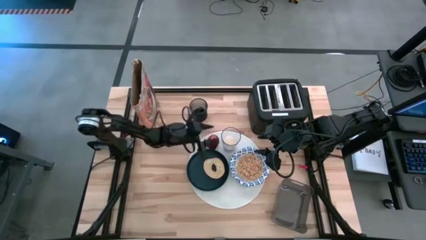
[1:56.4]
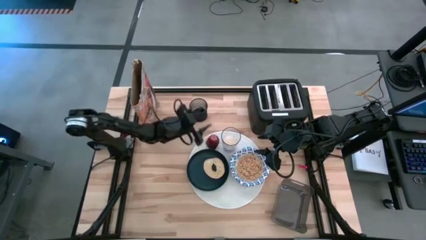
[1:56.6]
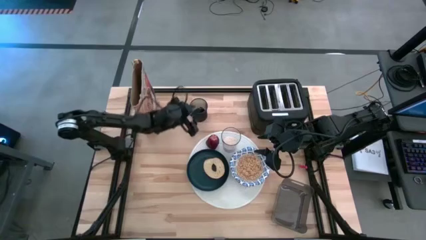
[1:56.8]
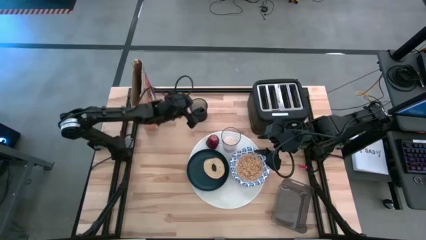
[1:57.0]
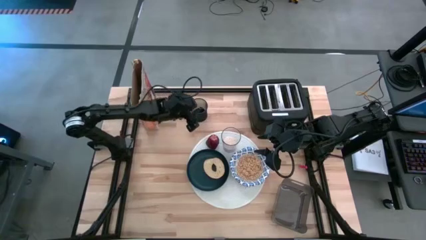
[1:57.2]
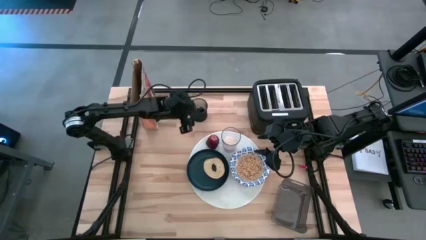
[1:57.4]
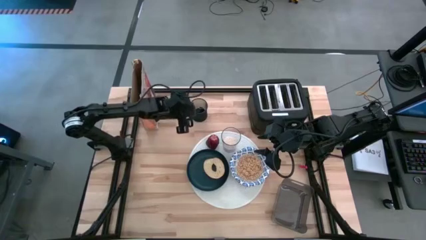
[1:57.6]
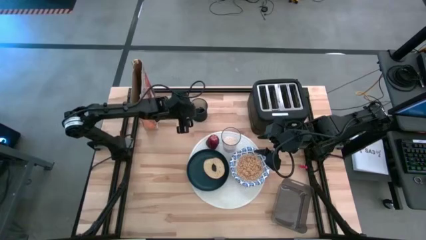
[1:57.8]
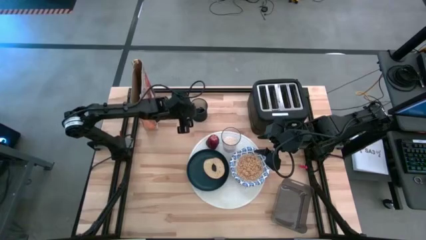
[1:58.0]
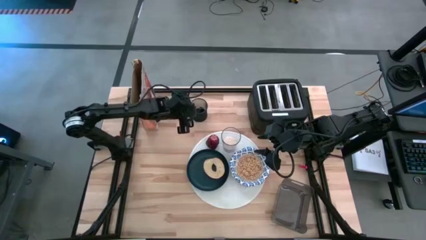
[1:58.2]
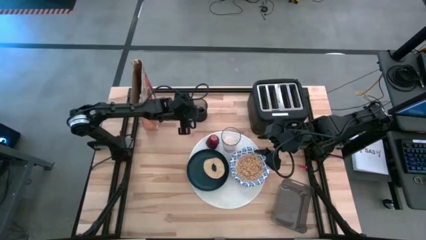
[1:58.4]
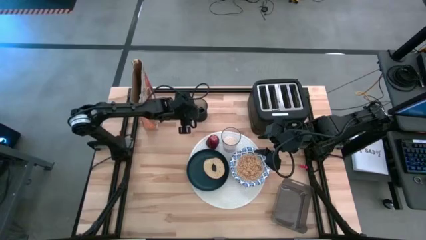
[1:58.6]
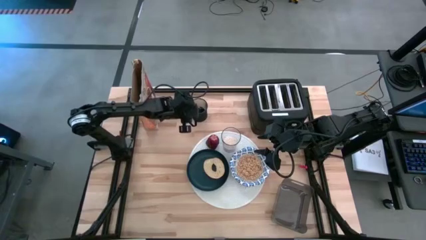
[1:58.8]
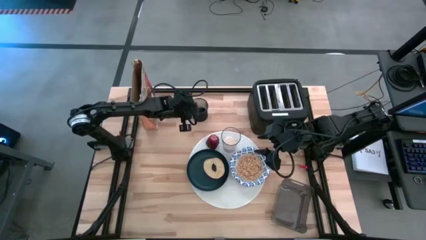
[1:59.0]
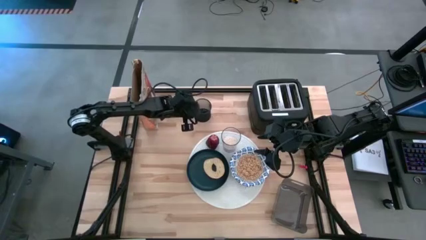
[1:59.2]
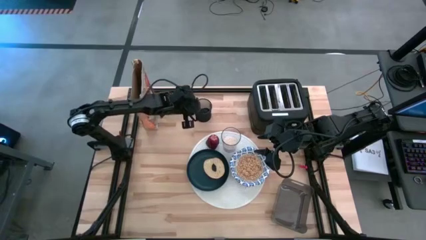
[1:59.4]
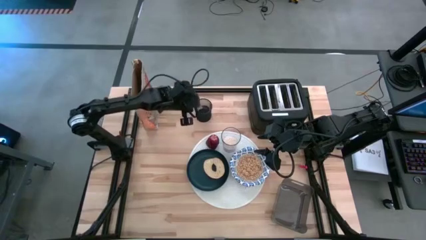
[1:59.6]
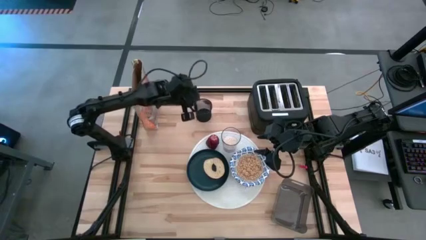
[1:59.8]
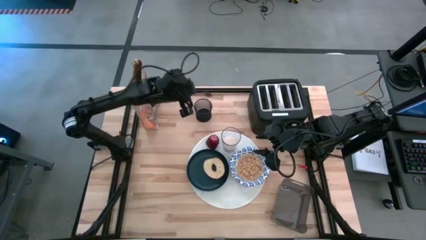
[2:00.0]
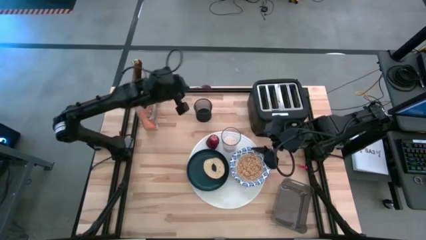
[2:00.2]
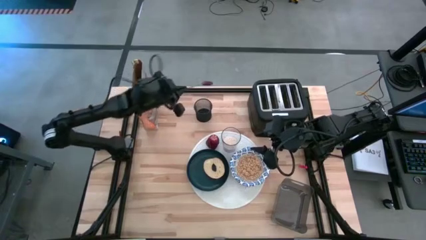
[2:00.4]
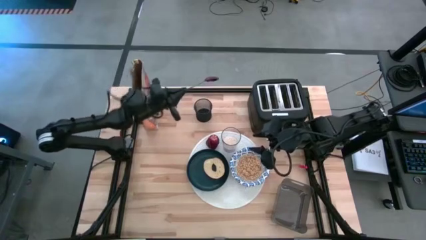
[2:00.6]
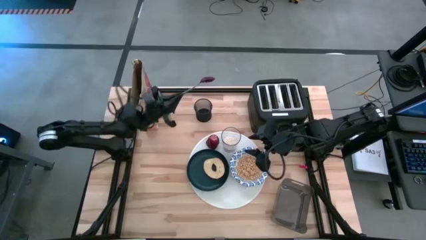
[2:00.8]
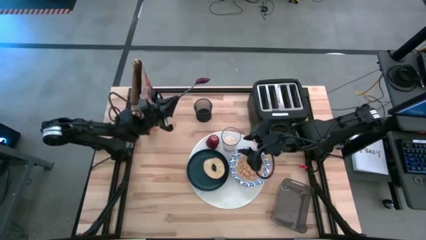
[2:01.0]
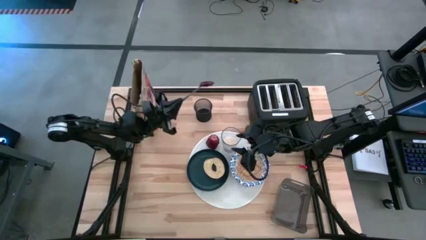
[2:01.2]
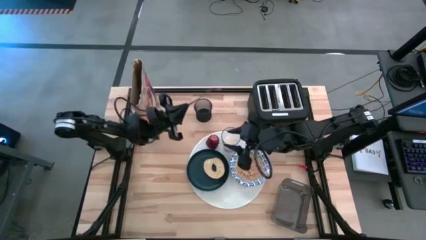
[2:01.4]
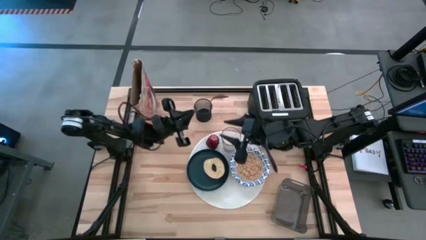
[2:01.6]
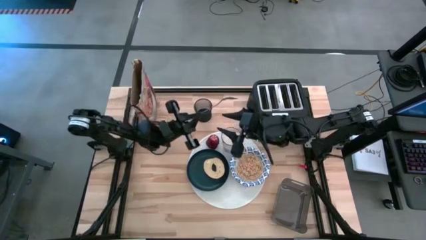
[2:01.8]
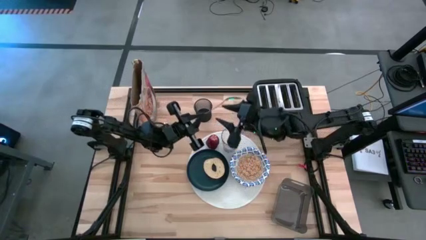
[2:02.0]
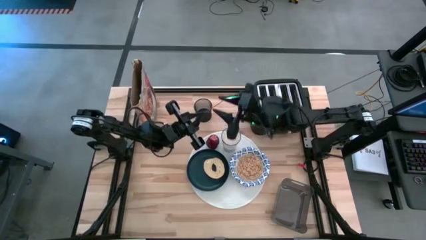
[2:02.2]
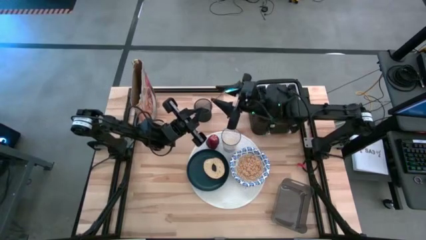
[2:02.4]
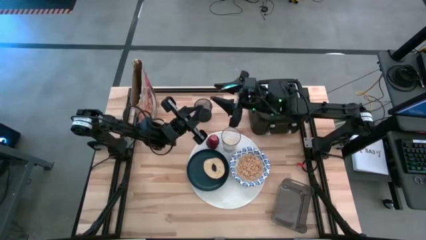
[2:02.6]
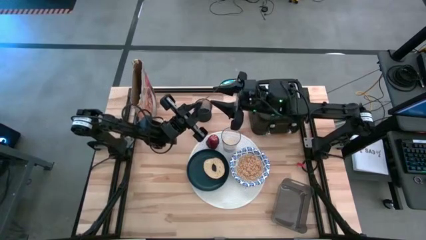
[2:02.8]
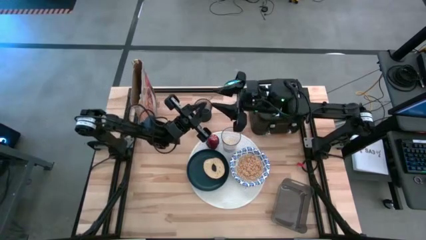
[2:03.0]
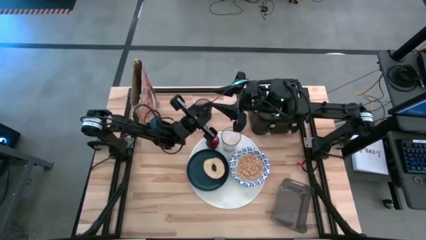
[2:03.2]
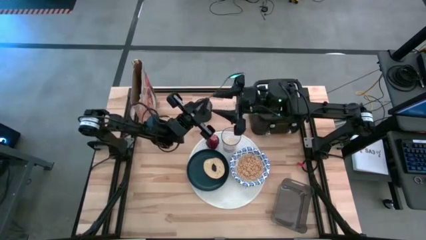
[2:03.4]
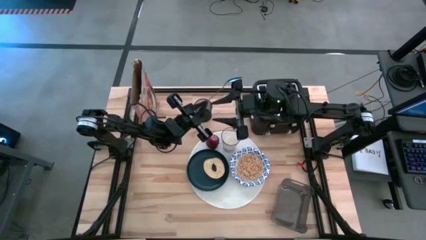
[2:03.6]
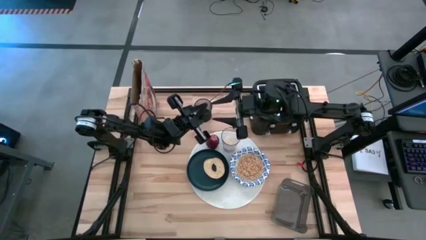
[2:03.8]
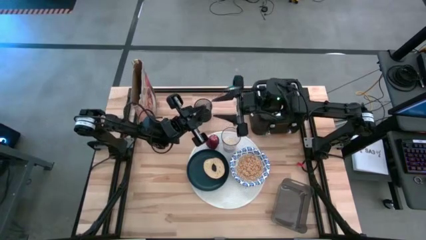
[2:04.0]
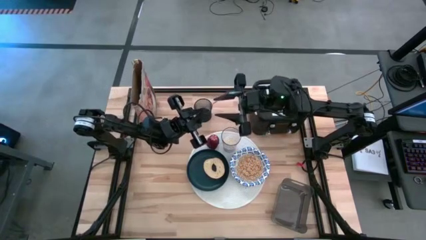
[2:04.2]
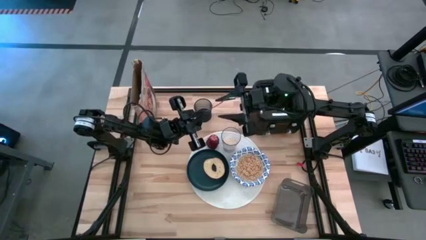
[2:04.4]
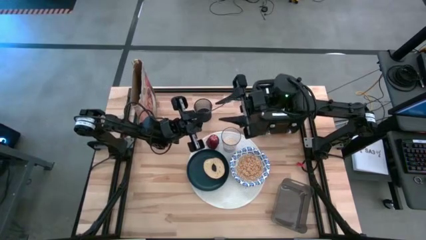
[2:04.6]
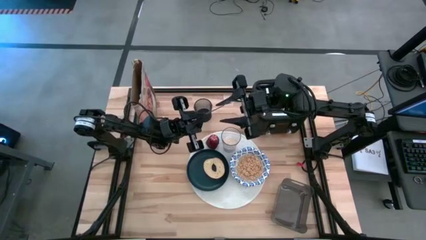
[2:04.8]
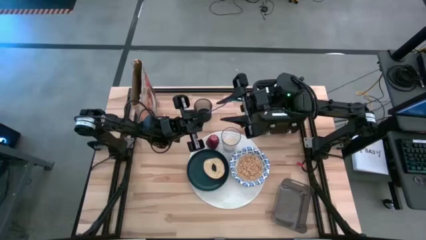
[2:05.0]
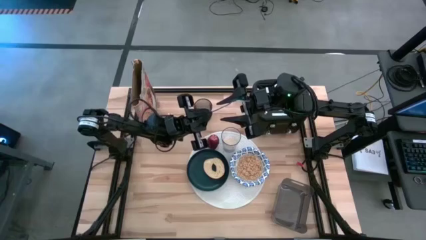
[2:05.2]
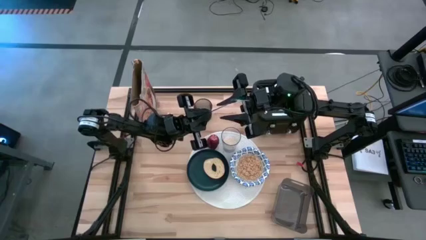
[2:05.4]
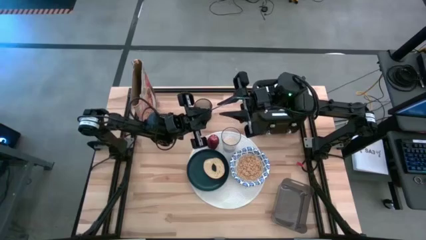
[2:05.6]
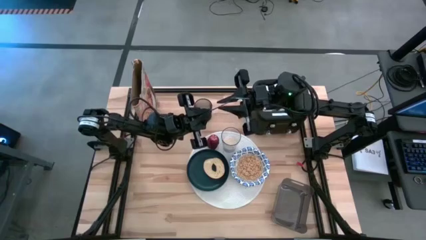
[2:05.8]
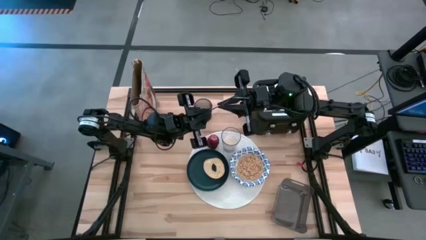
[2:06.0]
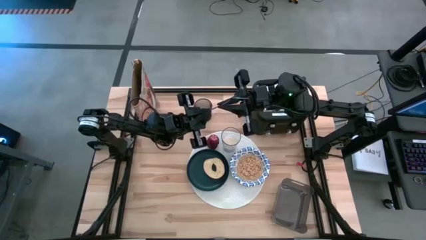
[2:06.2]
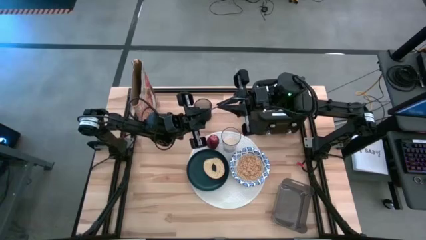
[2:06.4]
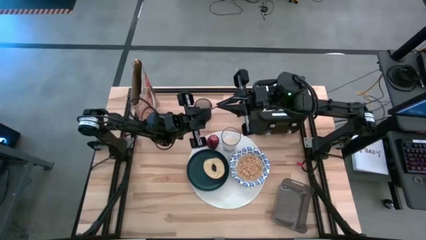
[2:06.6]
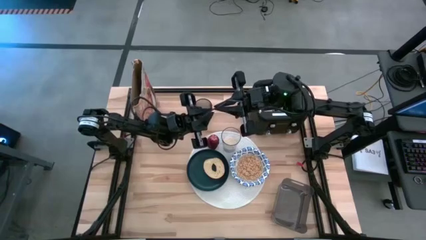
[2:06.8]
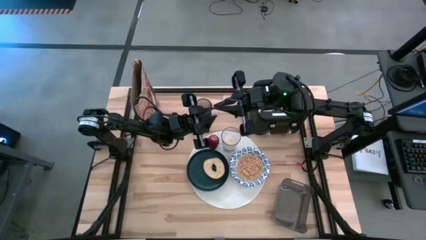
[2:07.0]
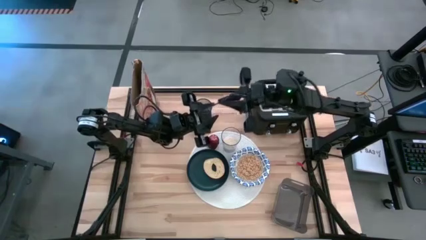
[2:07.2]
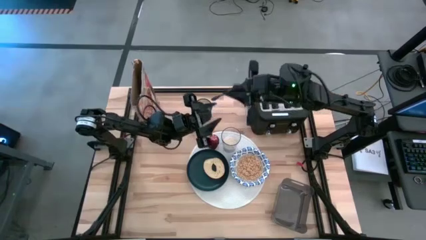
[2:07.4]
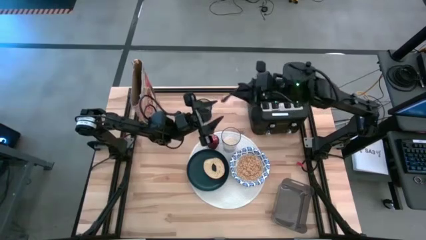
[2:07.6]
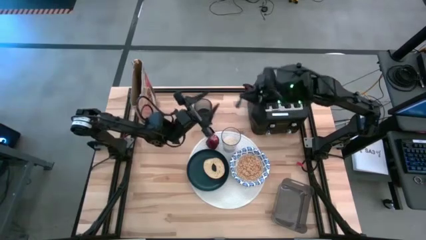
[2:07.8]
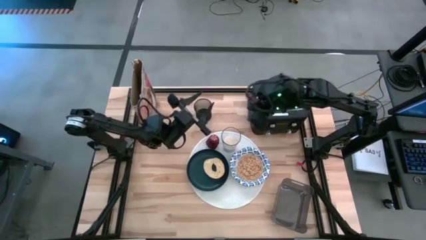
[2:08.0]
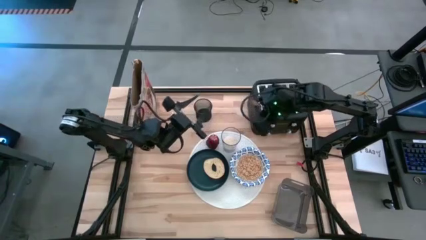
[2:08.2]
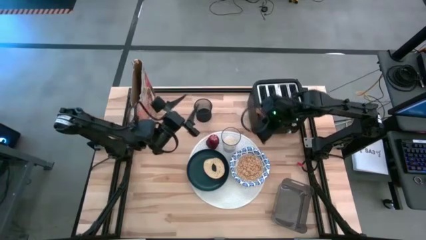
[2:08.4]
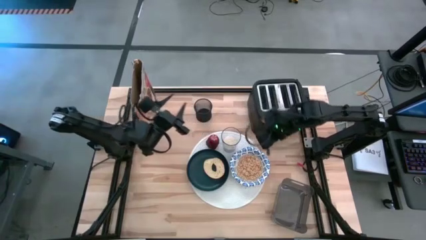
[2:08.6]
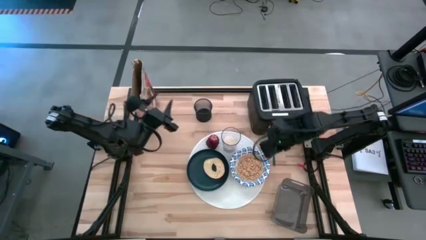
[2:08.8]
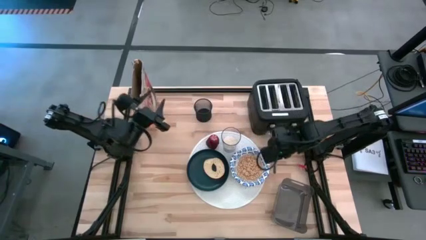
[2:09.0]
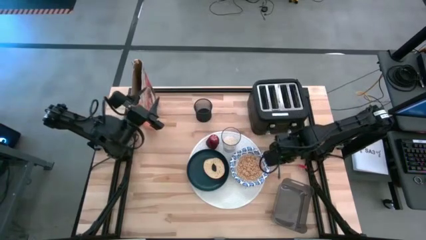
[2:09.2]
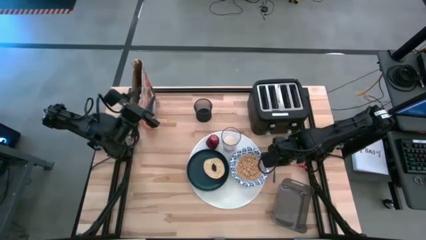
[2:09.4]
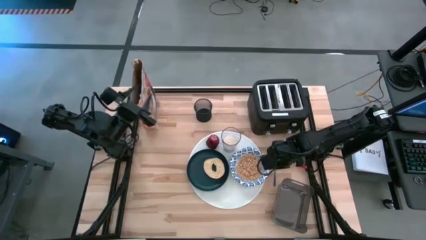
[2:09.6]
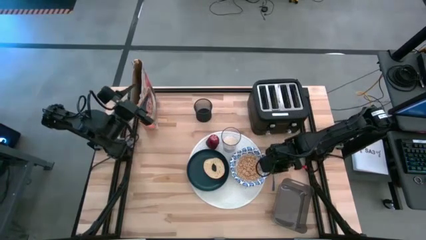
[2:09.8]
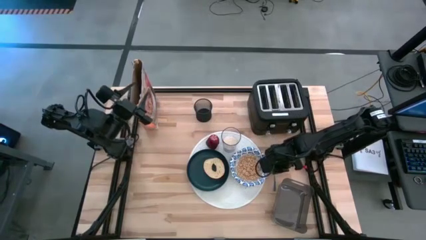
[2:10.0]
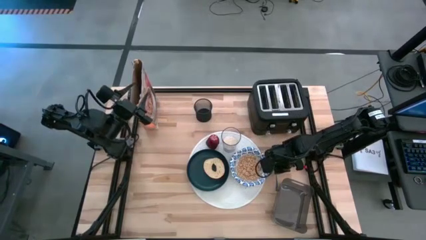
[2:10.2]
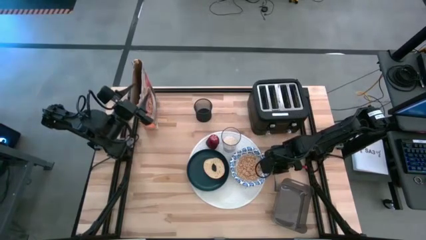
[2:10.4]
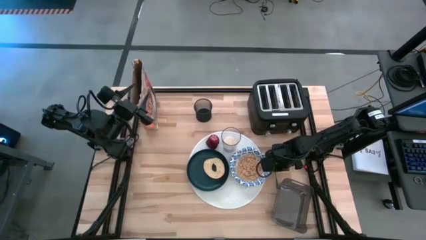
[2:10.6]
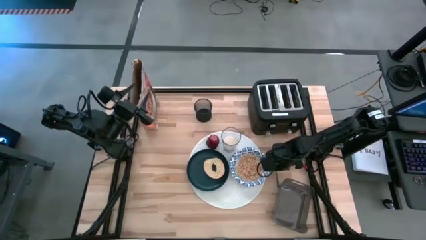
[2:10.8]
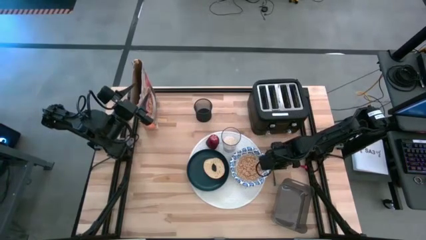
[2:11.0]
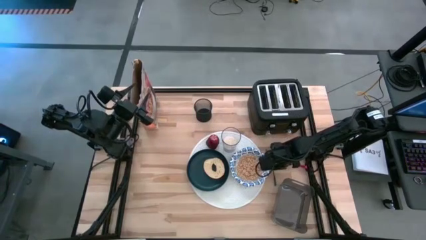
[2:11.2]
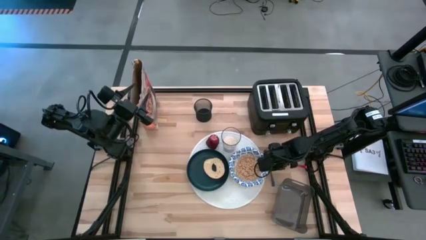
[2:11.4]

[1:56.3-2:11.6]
Task: Arrange a breakfast setting
Put the spoon to the right of the white patterned bowl

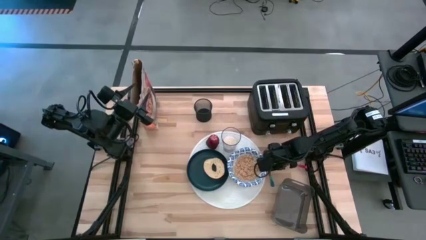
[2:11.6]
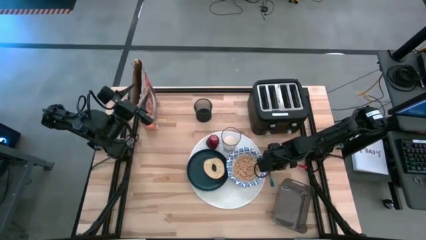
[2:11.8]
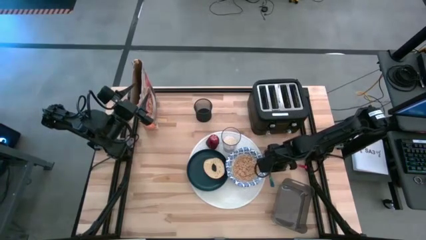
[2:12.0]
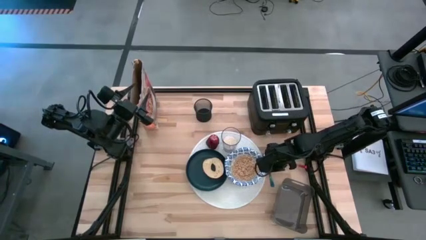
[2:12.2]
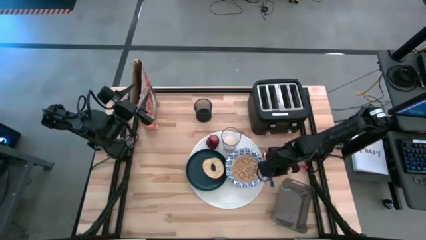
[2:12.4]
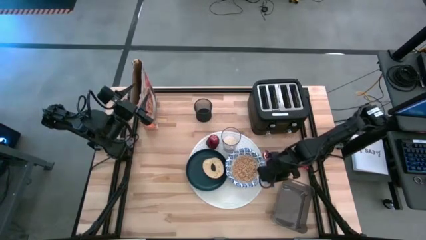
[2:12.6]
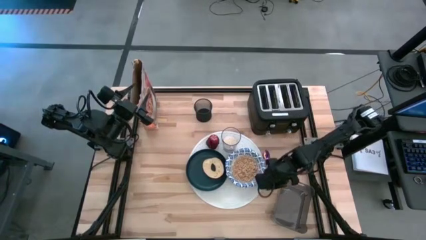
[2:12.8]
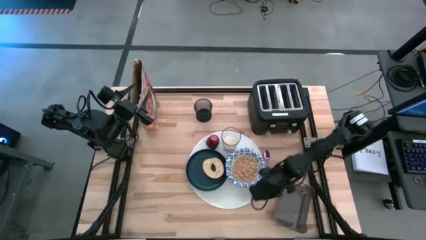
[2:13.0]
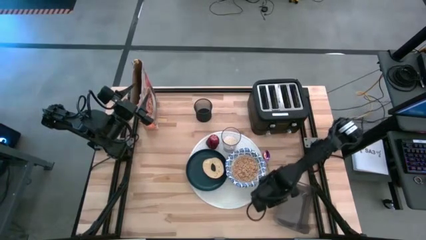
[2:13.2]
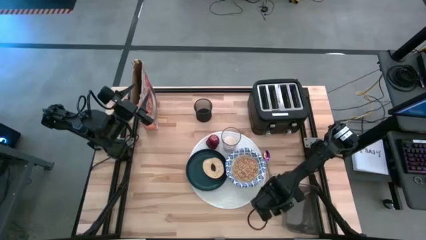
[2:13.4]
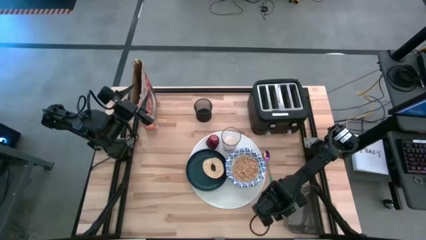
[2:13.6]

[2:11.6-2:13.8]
Adjust the black bin

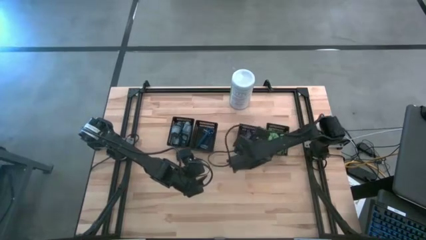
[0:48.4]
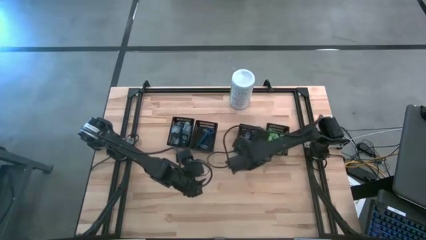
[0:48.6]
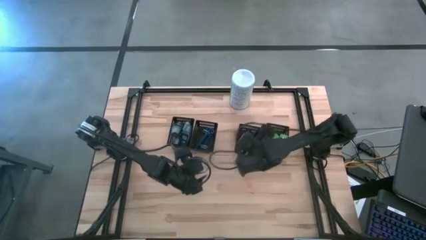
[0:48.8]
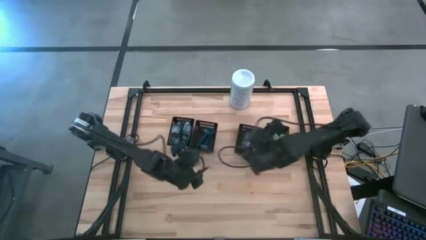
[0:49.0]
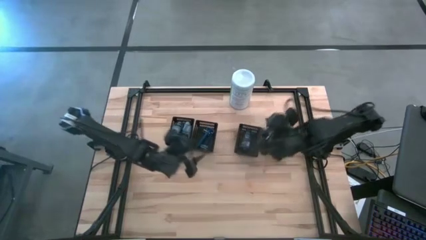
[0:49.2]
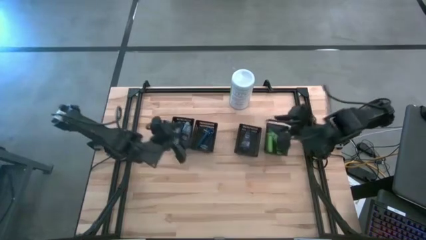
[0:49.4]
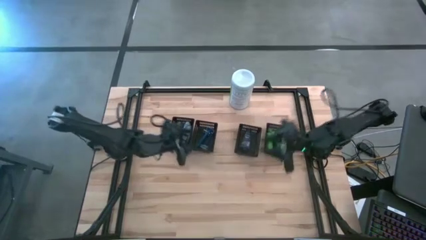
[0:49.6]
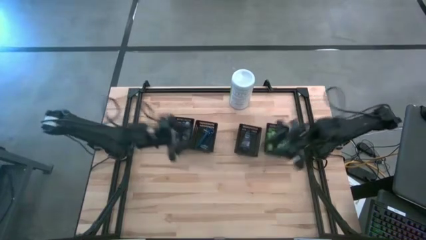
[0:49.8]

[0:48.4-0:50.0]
Task: Pick & Place Travel size toiletries
Return to Home Position
